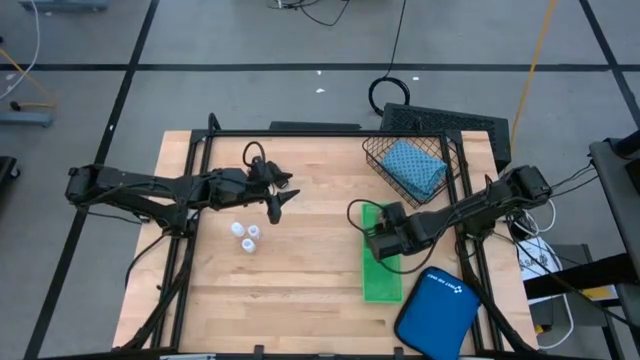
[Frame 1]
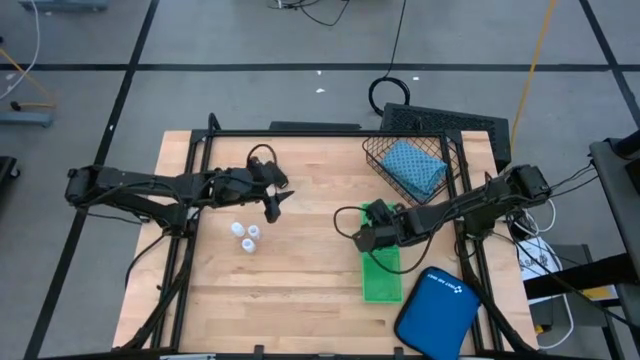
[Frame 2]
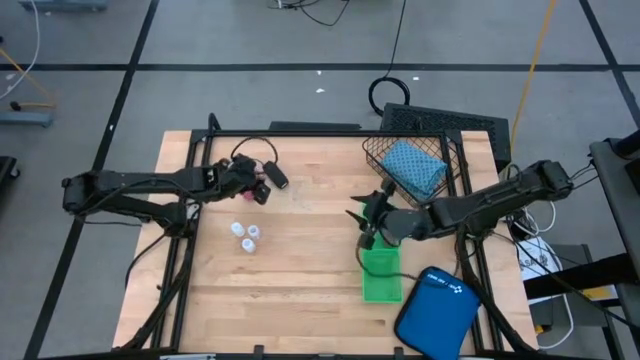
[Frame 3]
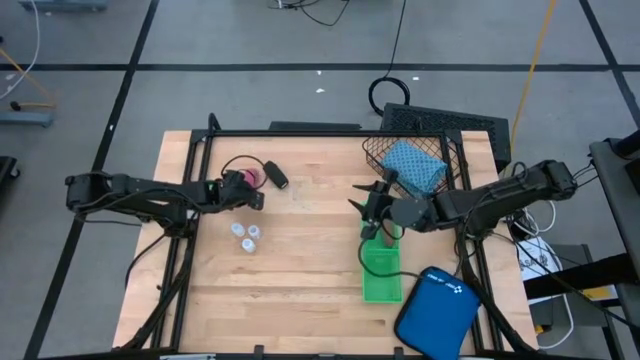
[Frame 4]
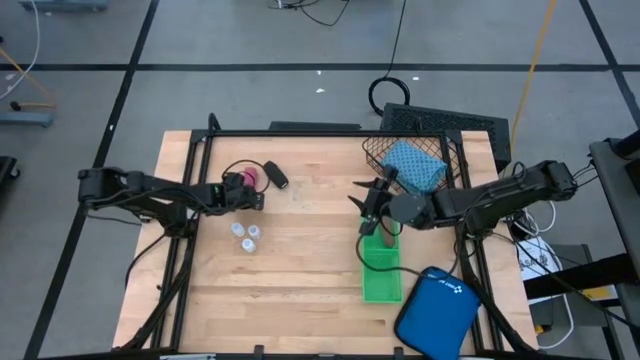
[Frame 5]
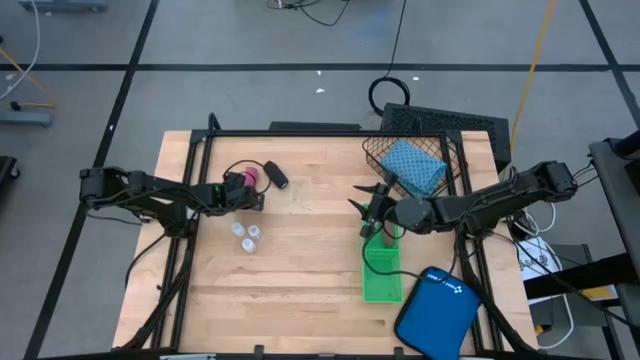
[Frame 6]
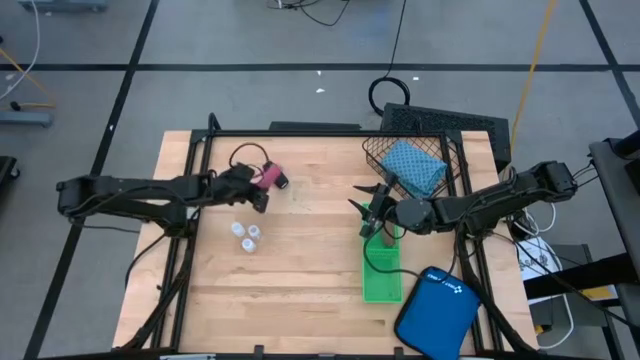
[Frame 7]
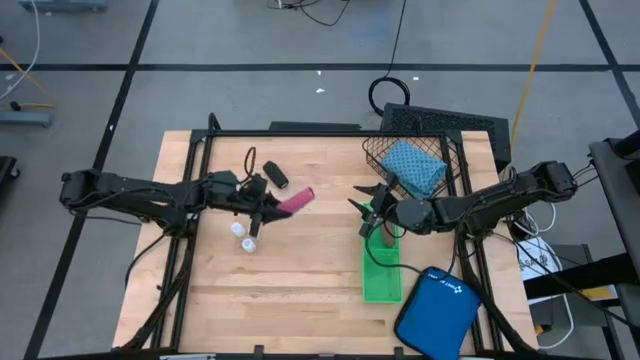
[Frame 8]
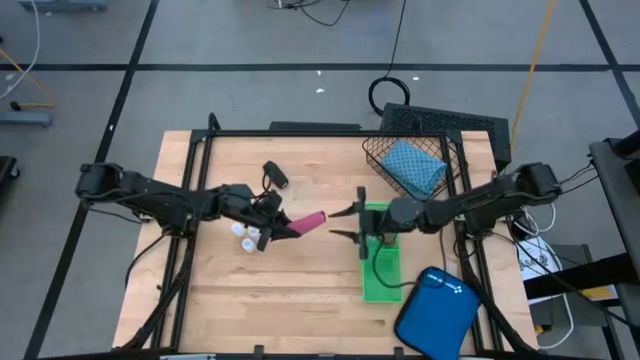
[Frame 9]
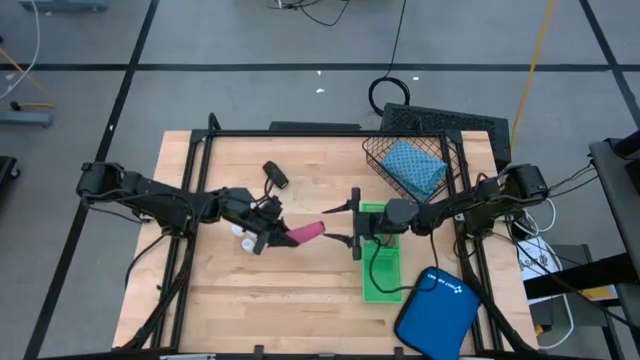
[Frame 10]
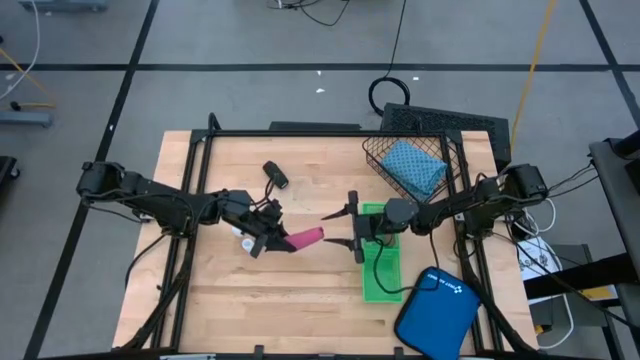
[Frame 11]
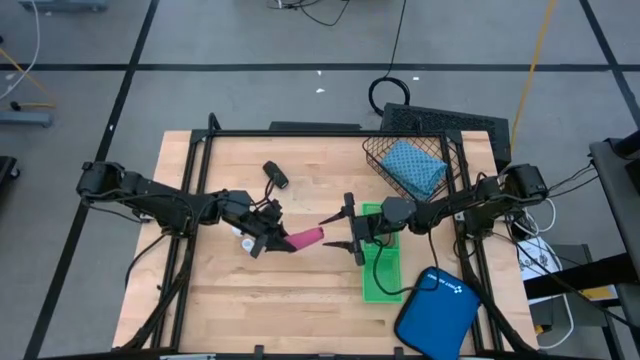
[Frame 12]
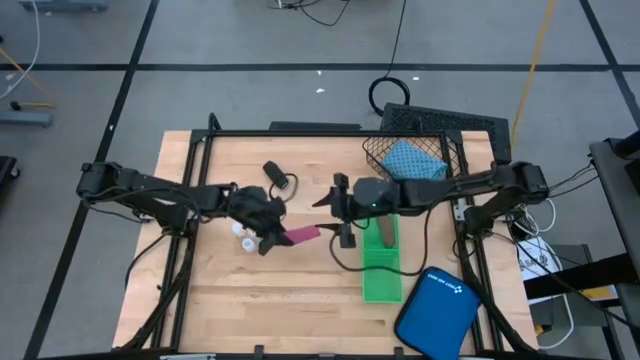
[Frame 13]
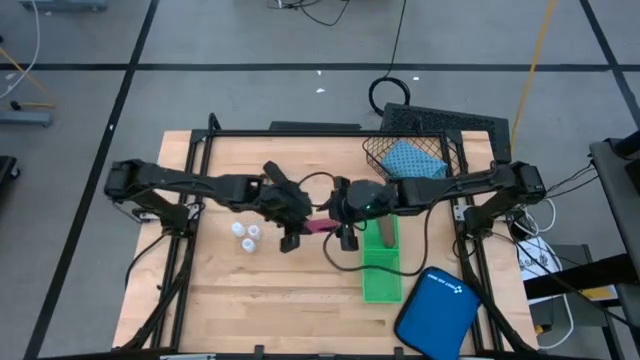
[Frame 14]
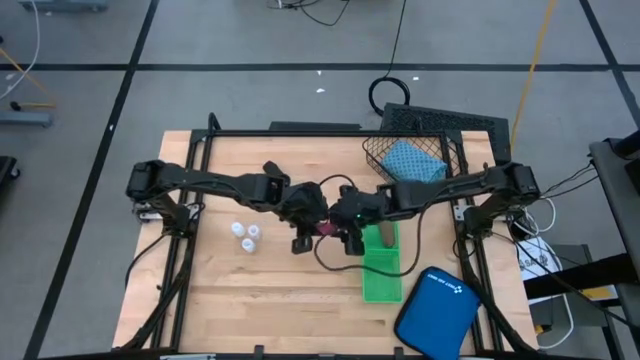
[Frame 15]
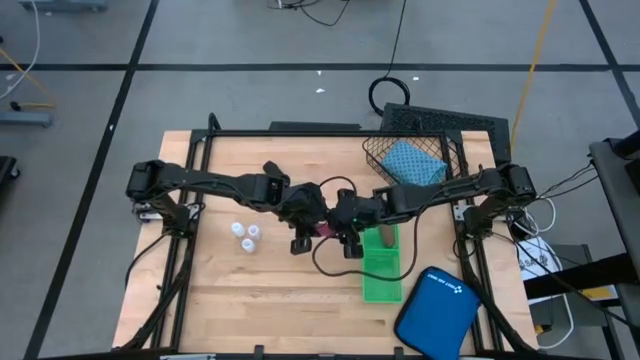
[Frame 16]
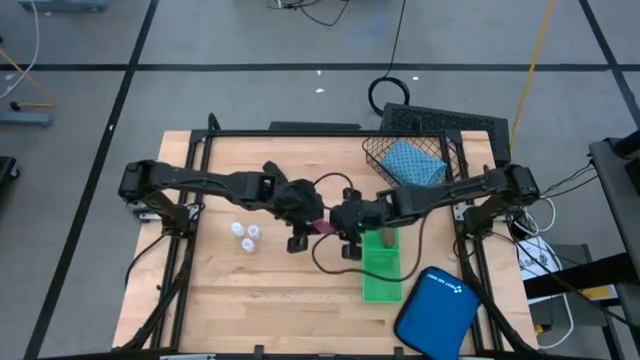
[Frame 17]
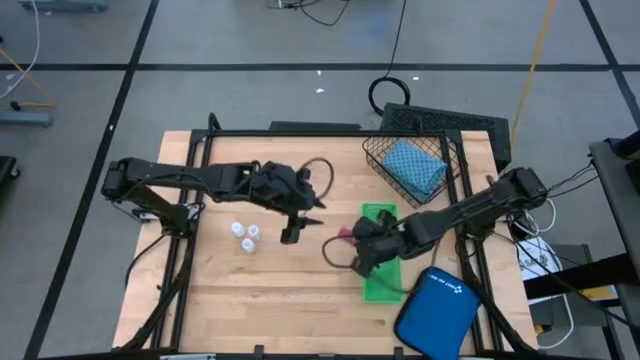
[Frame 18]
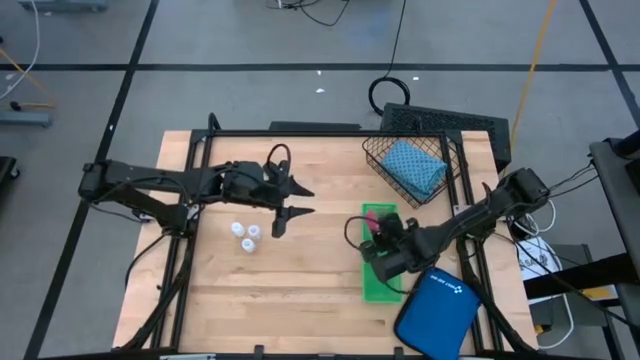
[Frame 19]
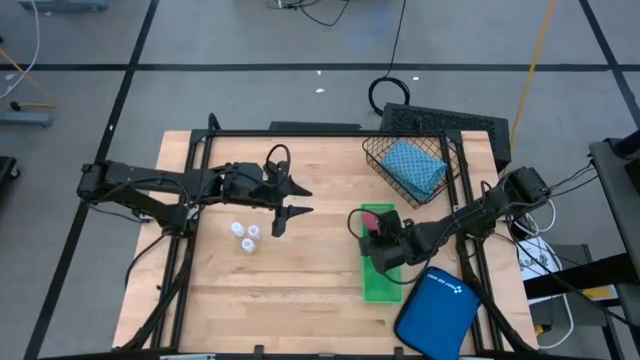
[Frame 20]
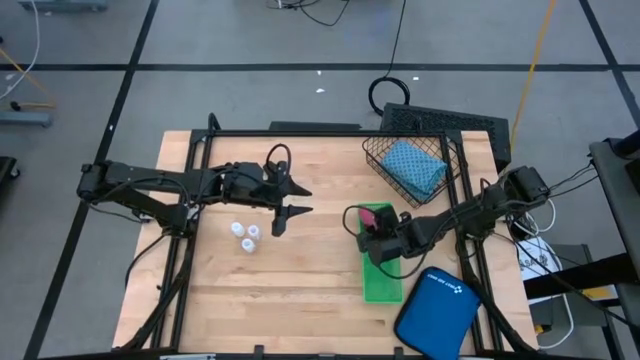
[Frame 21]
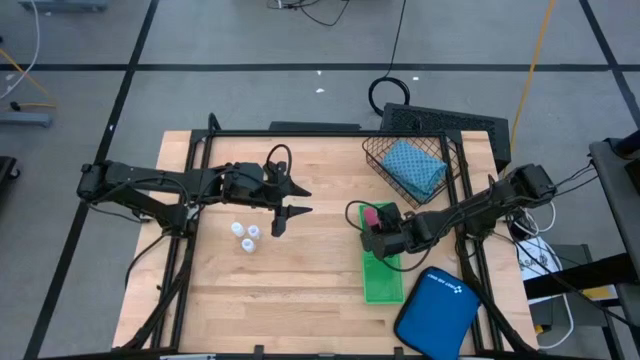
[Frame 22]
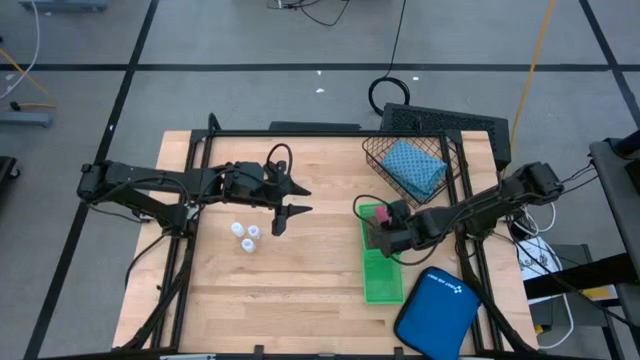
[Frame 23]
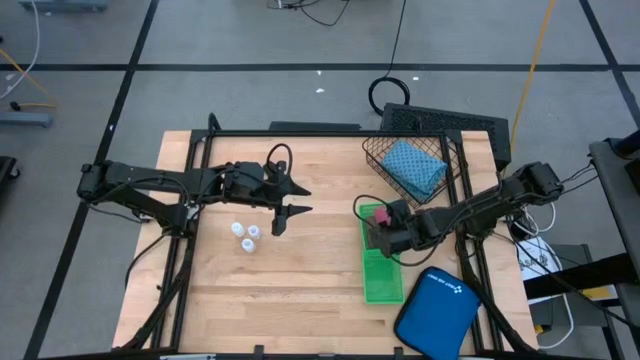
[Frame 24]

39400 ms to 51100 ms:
Task: Pick & Place Medicine items
Put the pink bandage into the top green basket

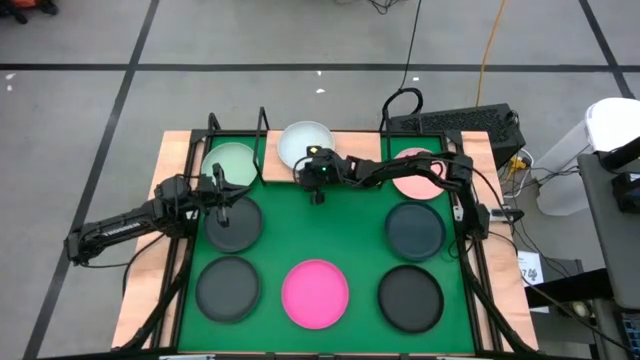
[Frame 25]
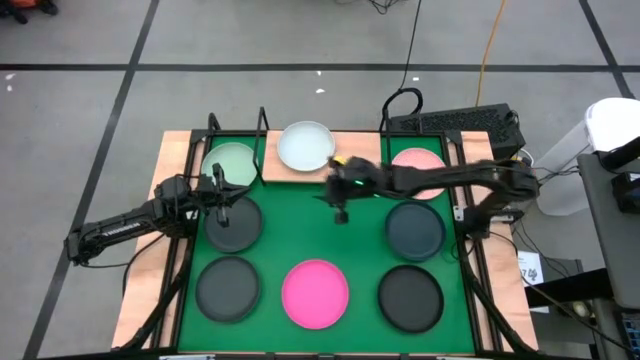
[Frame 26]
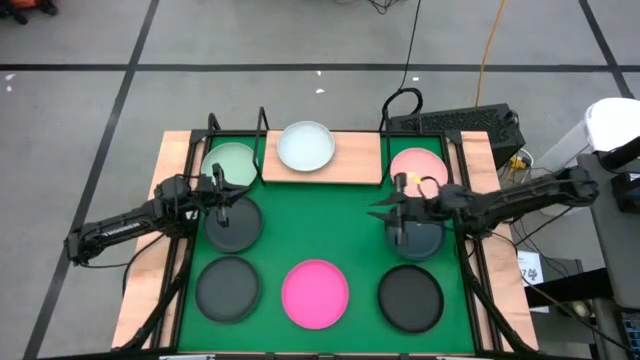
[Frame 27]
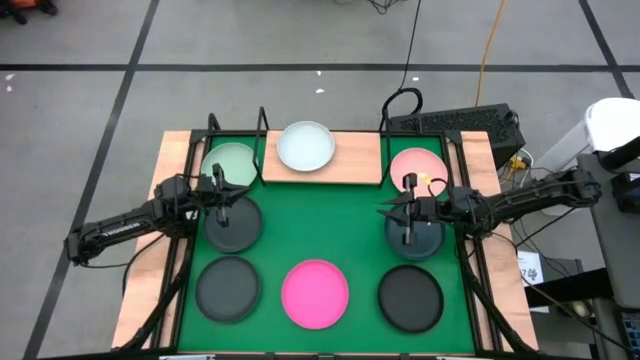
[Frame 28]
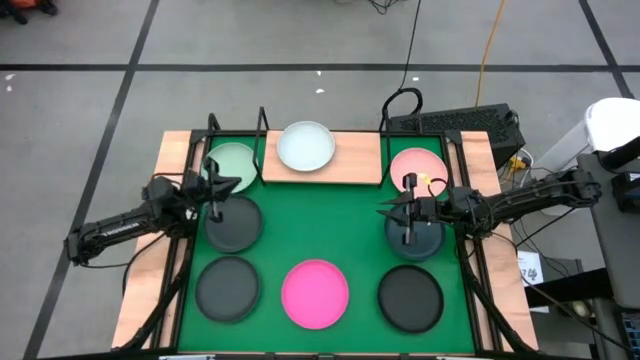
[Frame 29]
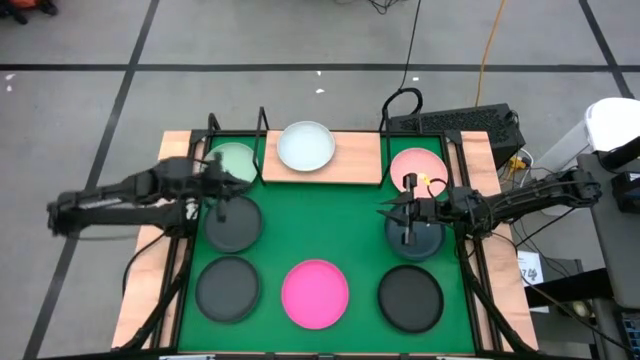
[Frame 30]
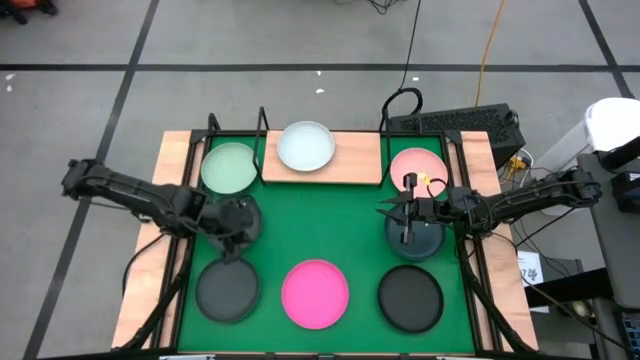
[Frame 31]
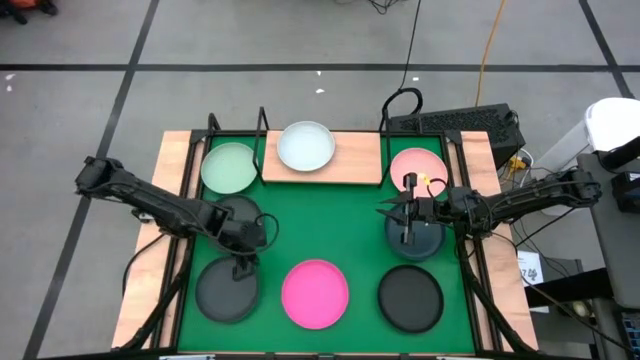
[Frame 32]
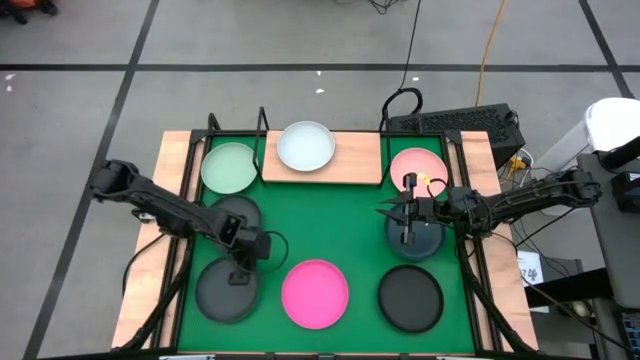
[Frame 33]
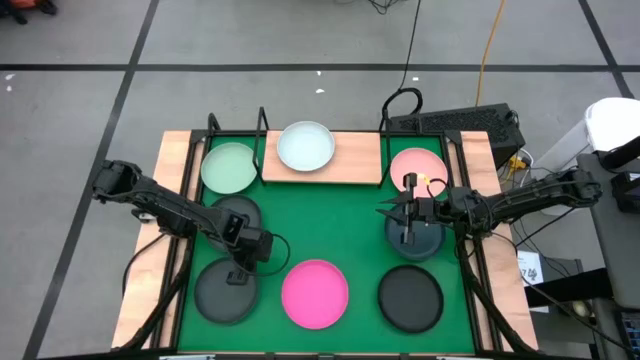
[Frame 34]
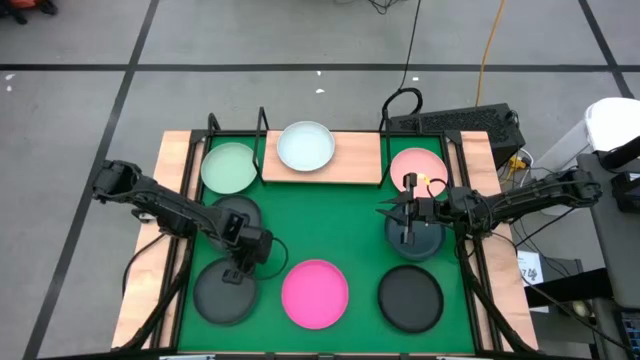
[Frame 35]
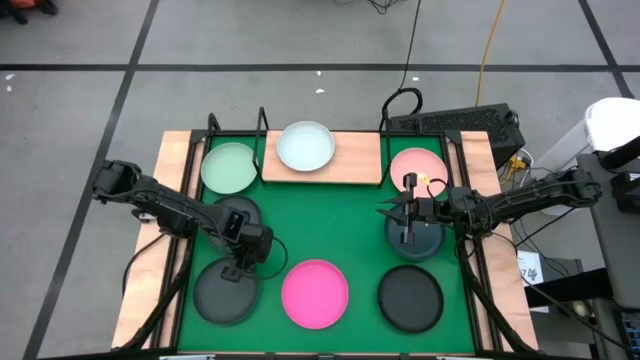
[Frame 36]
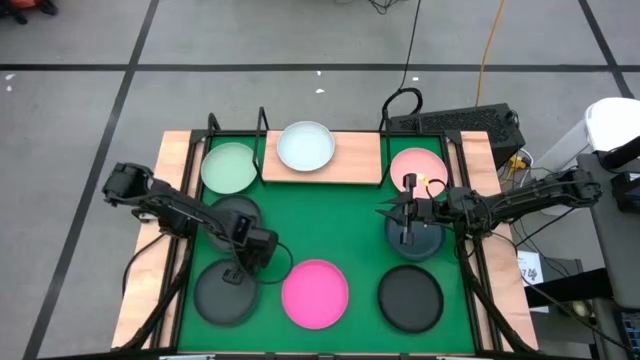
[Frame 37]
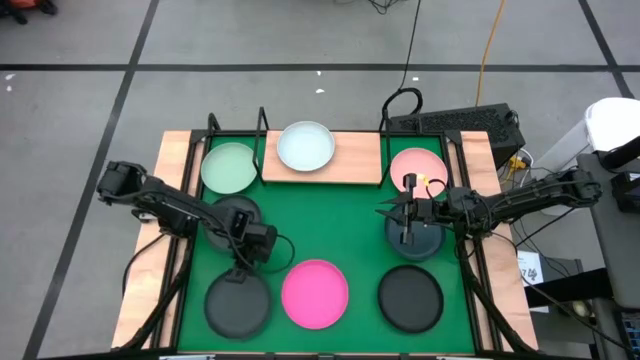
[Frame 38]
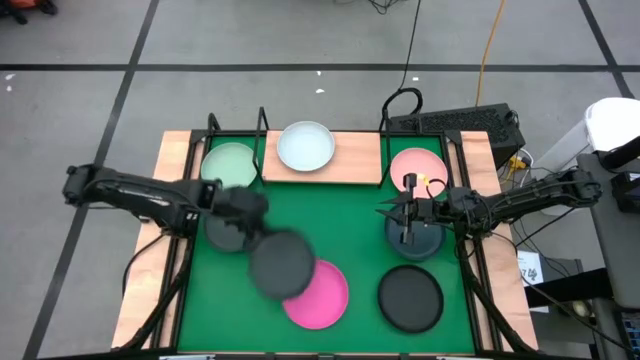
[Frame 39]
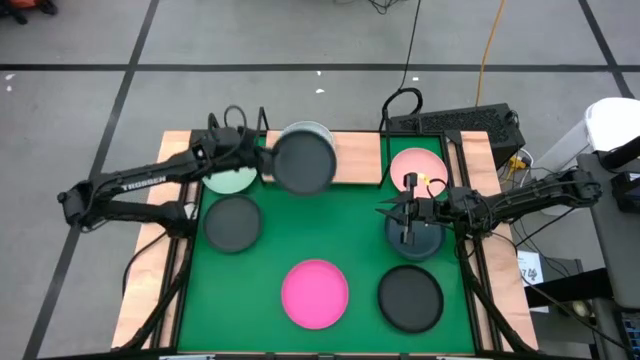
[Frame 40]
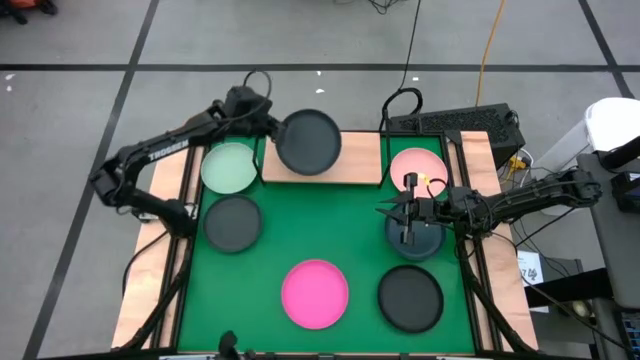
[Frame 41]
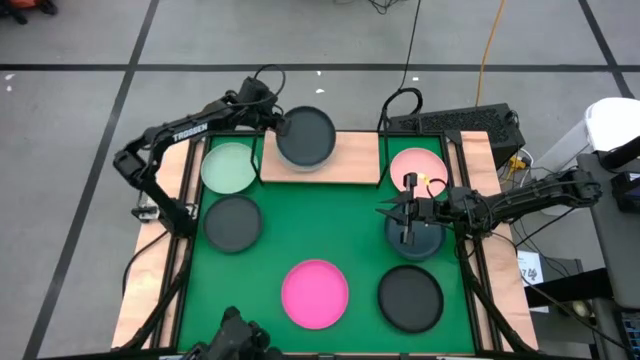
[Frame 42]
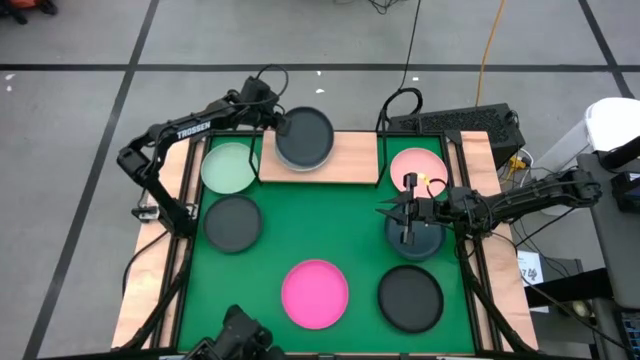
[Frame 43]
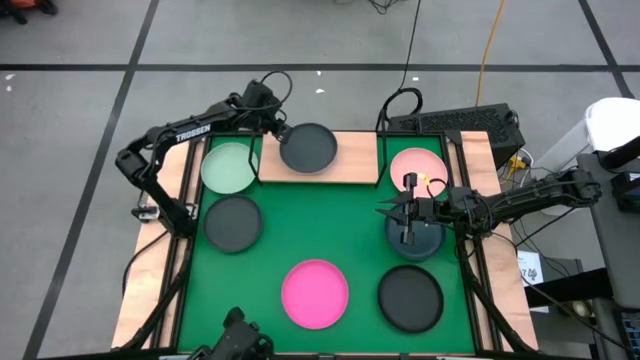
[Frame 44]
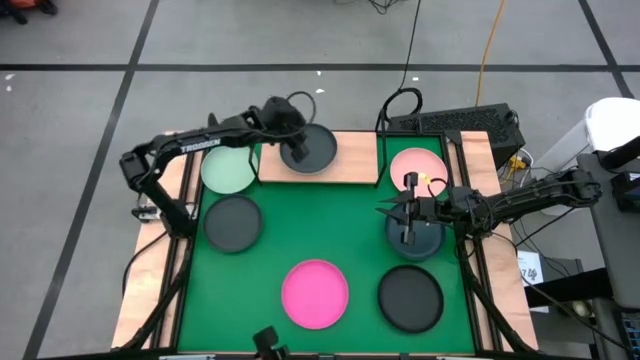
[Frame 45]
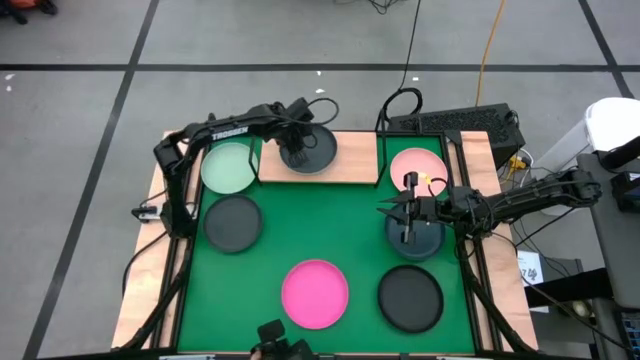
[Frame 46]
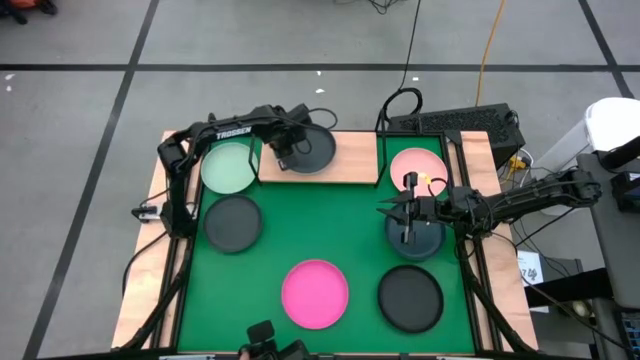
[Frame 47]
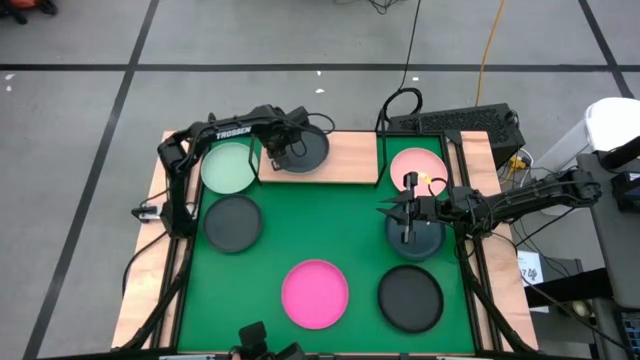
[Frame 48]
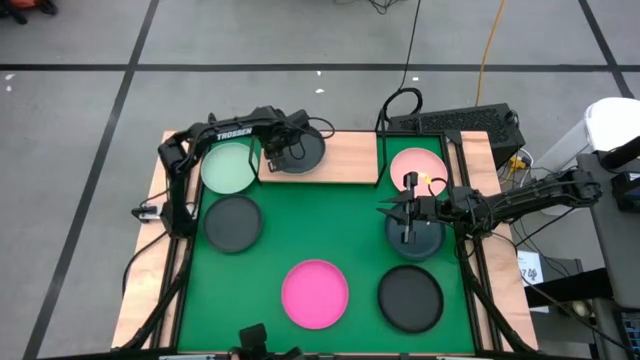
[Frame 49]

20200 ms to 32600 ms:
Task: Place and stack plates onto a shelf
Stack the left black plate on top of the white plate on the shelf
